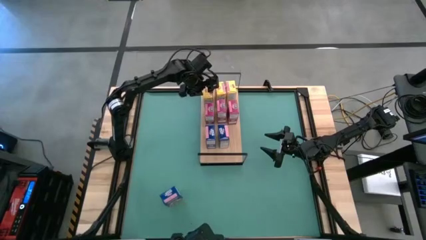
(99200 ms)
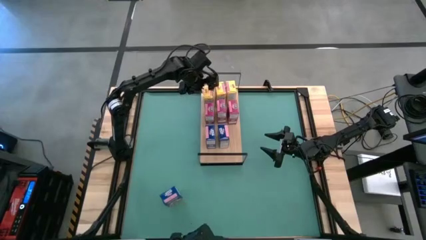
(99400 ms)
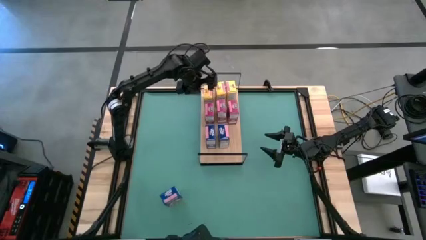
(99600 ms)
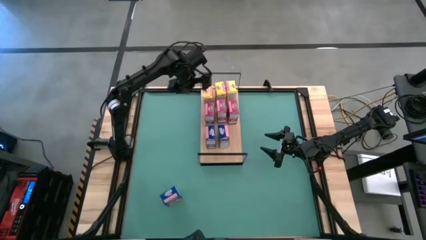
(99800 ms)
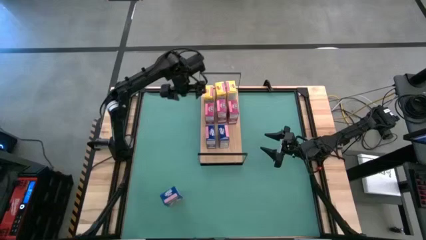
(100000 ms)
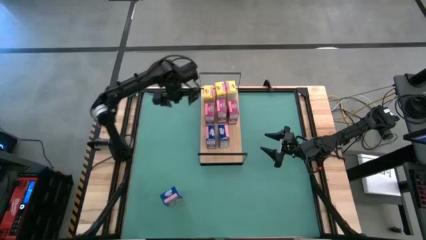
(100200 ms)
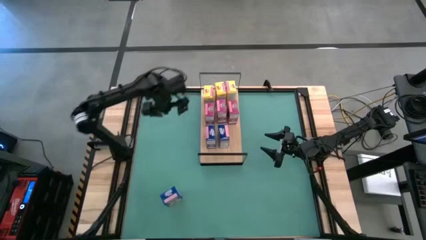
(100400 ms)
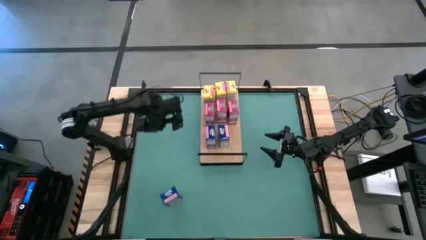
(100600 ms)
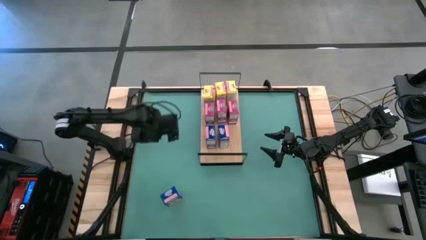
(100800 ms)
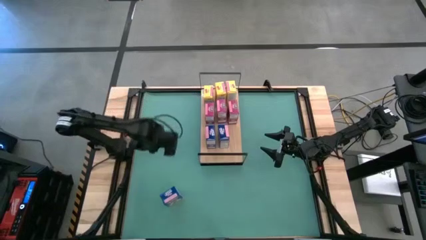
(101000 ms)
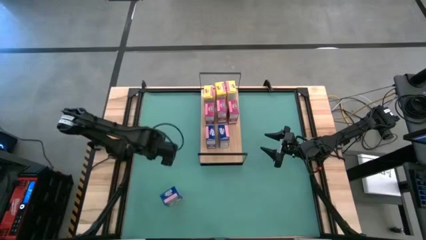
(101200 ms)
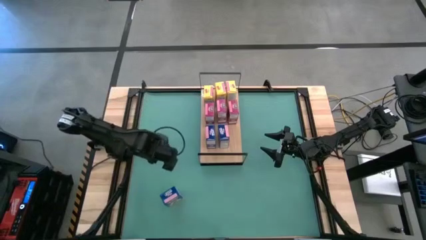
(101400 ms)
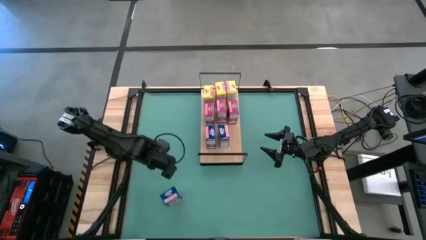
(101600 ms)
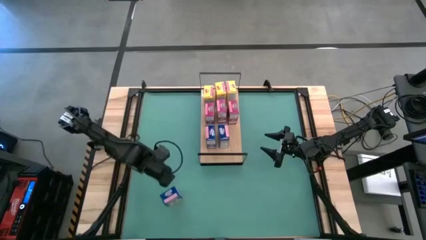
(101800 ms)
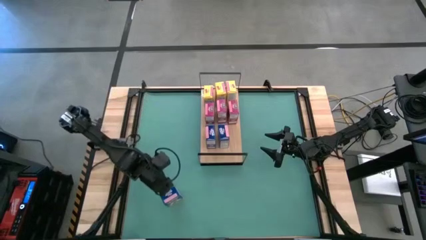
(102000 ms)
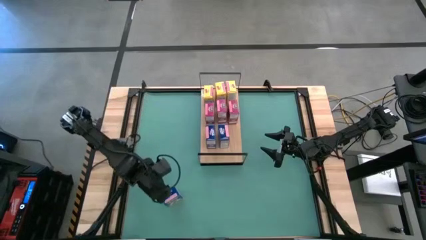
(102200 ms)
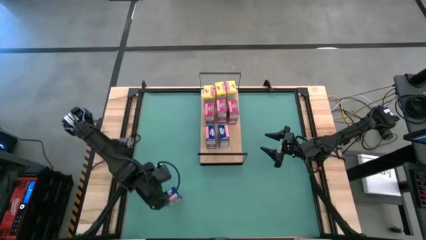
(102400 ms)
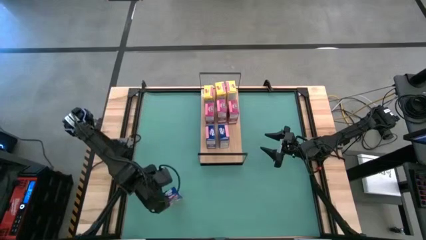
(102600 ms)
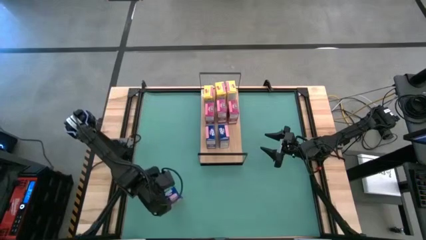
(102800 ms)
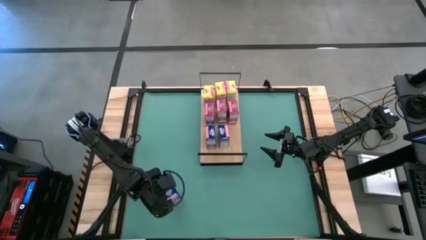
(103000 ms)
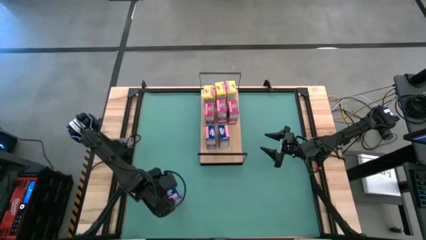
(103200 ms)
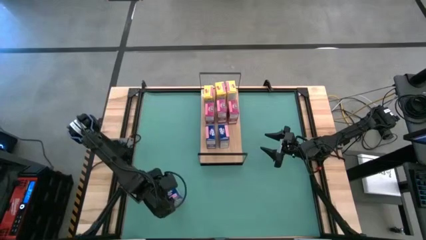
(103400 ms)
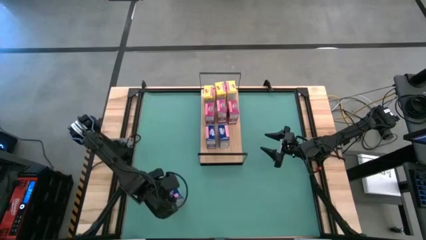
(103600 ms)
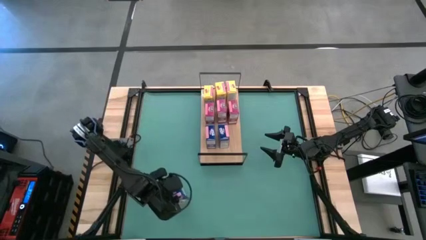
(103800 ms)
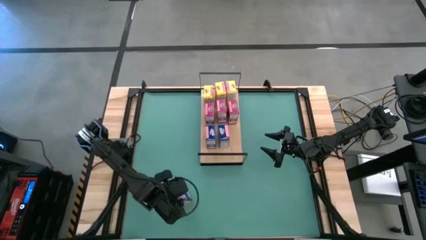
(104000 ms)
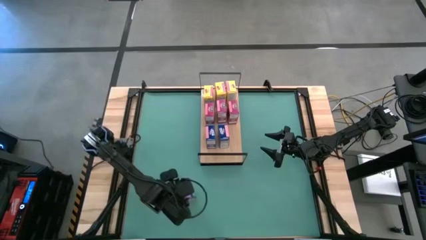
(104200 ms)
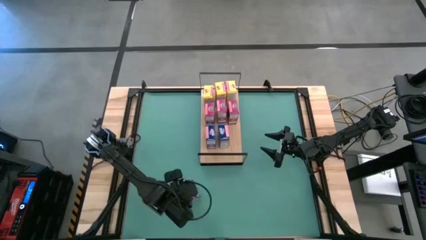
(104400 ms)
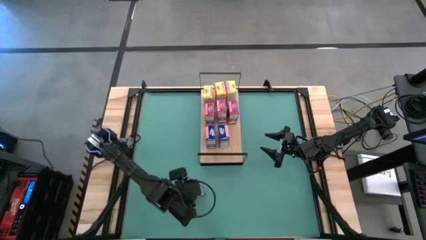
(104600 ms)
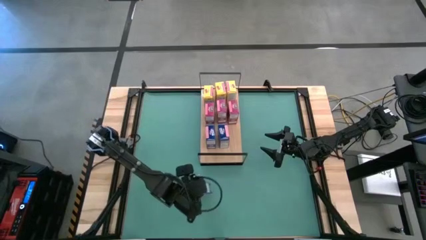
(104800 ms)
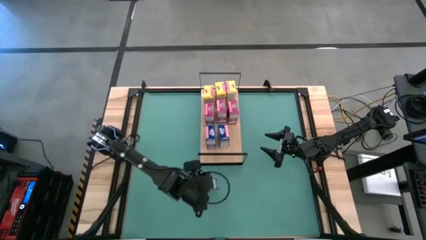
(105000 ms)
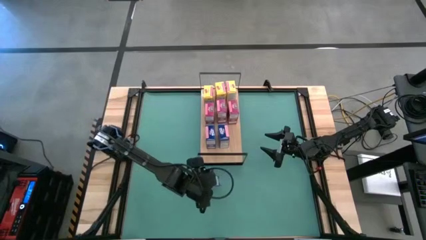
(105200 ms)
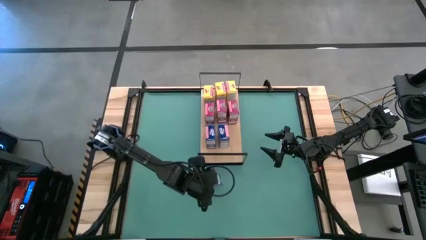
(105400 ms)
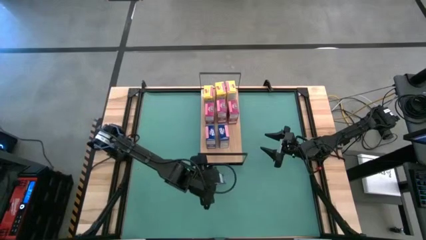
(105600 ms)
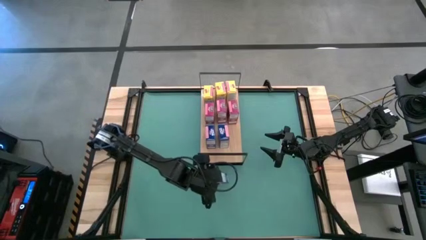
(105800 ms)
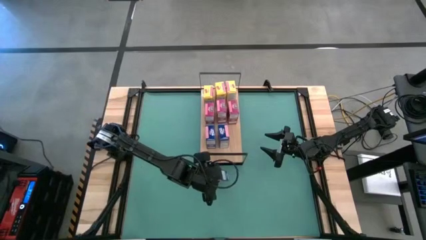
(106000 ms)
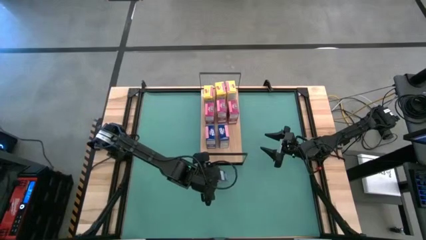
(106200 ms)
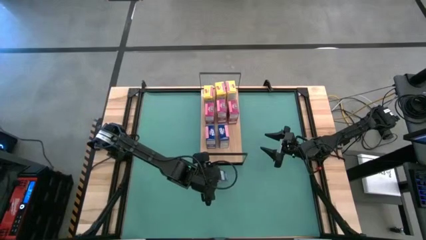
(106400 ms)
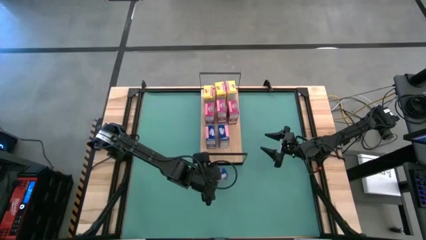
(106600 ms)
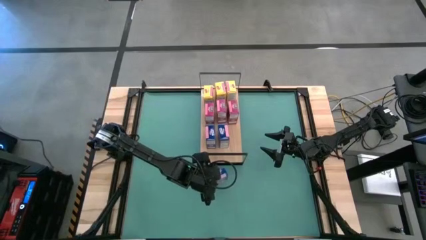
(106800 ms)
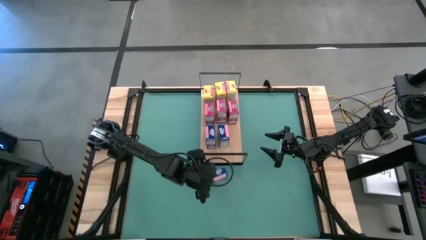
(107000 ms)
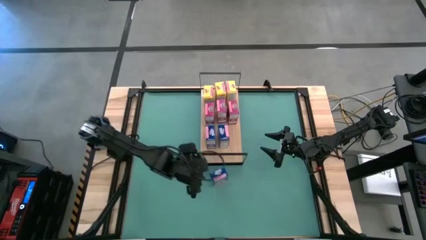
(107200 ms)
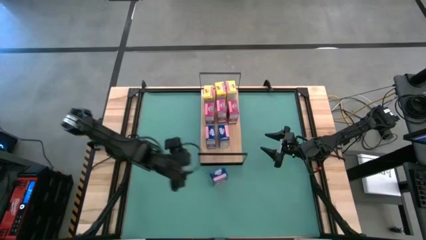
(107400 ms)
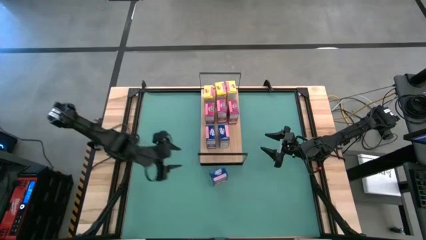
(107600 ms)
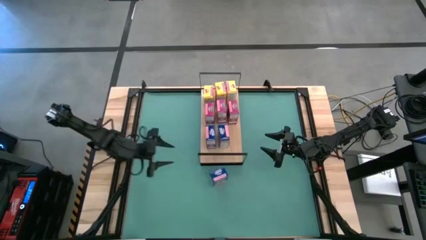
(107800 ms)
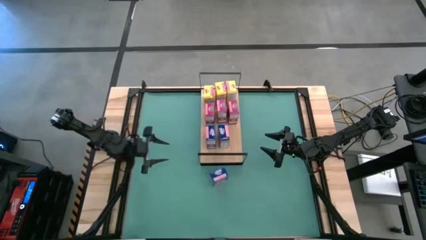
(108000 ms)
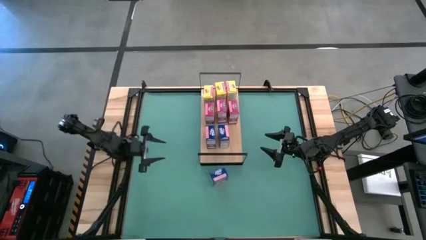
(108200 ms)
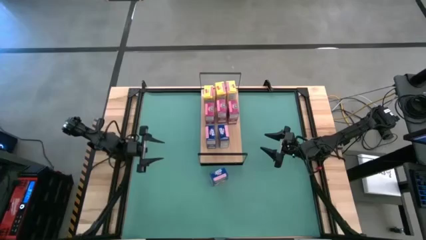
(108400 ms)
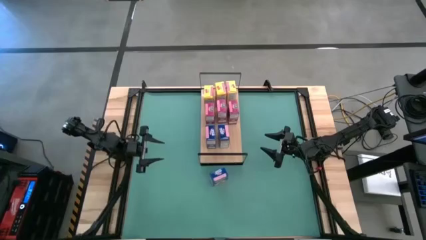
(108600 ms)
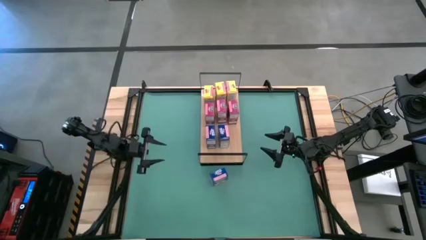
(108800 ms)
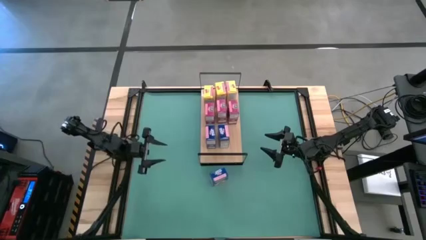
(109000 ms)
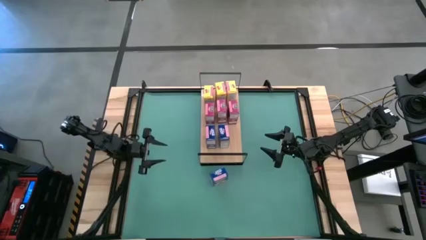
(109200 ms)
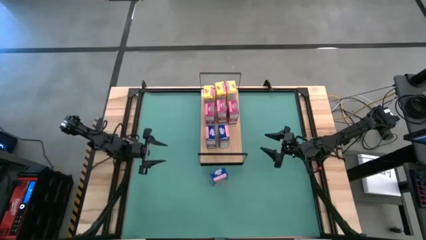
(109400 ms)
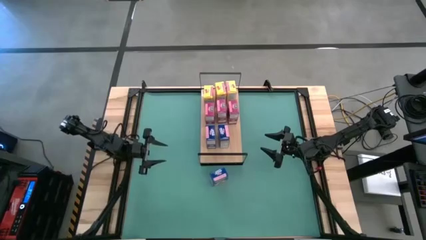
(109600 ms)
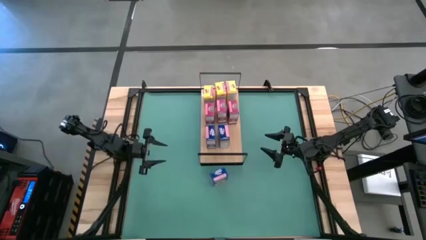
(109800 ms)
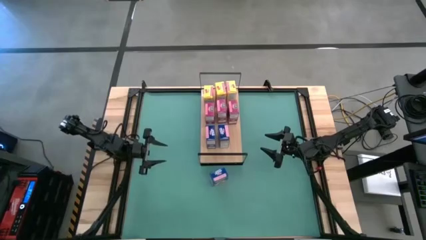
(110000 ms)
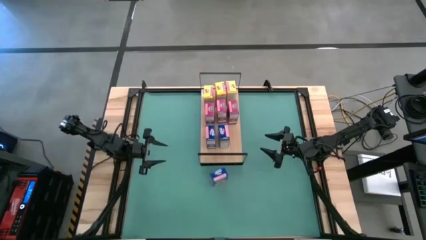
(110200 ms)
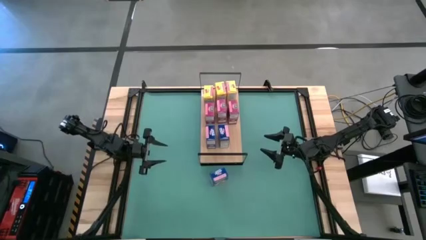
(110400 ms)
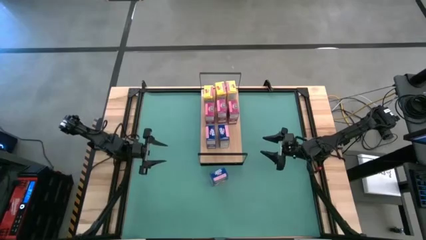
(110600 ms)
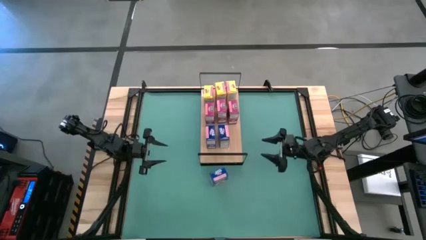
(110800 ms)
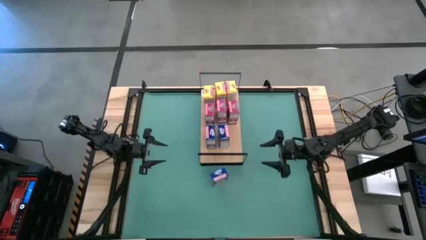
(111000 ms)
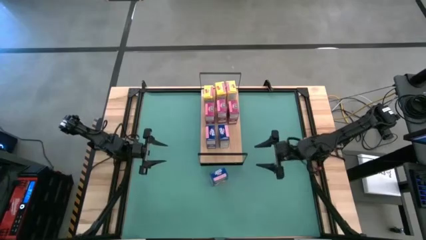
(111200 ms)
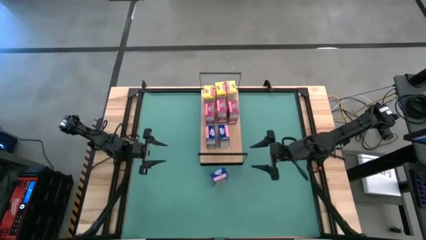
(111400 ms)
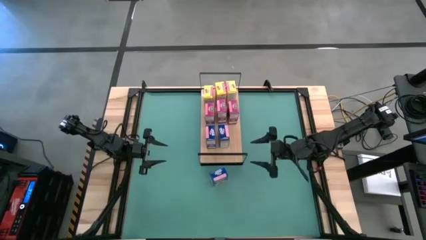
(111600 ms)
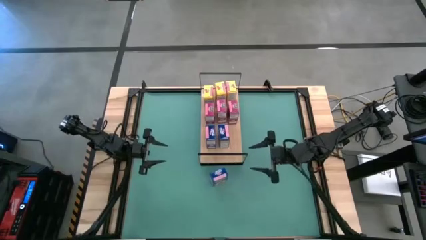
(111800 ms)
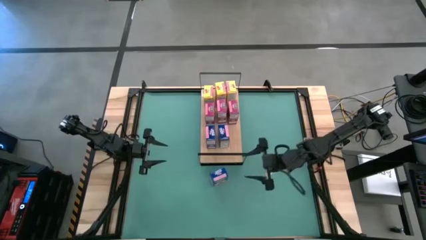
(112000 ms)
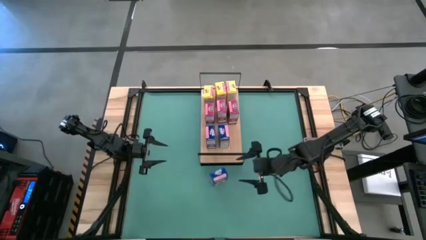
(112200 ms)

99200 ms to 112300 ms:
Task: Stack cereal on shelf
Put the blue cereal box on the shelf aligned with the other blue cereal boxes
